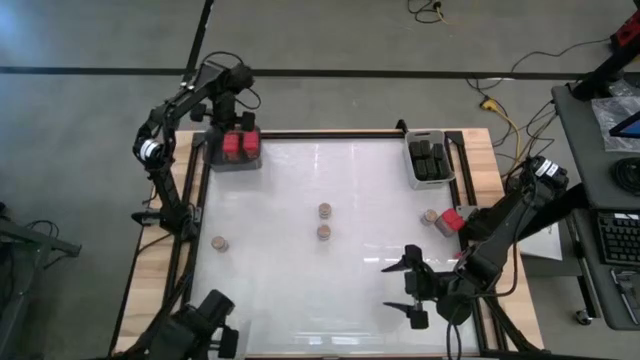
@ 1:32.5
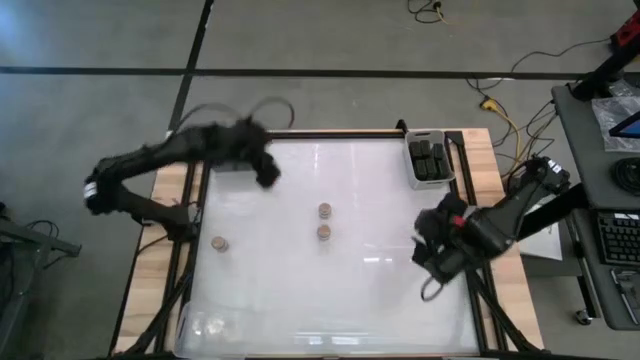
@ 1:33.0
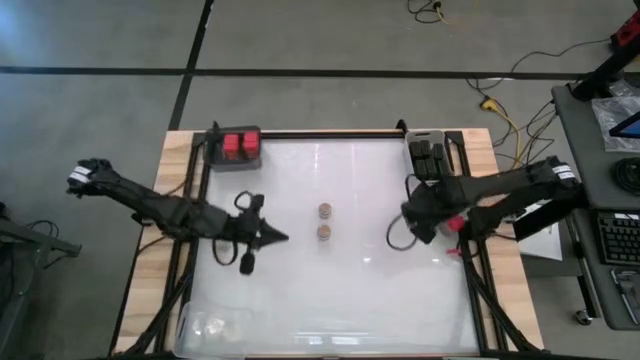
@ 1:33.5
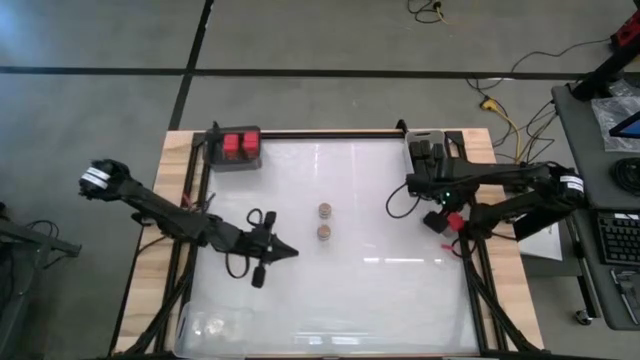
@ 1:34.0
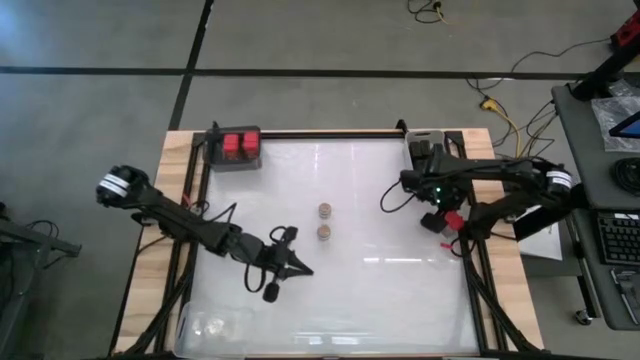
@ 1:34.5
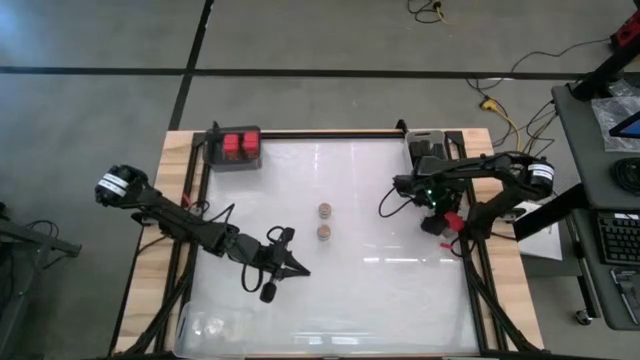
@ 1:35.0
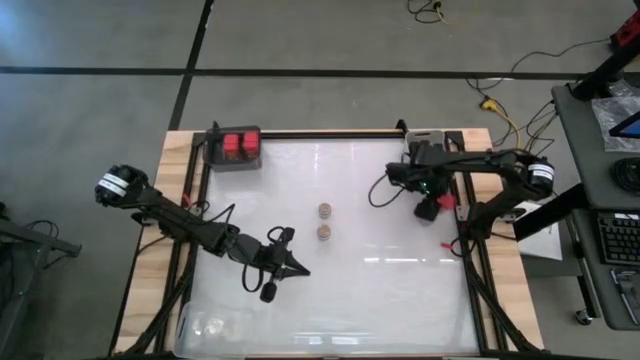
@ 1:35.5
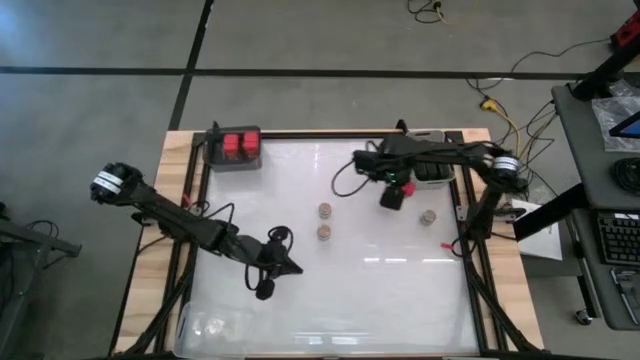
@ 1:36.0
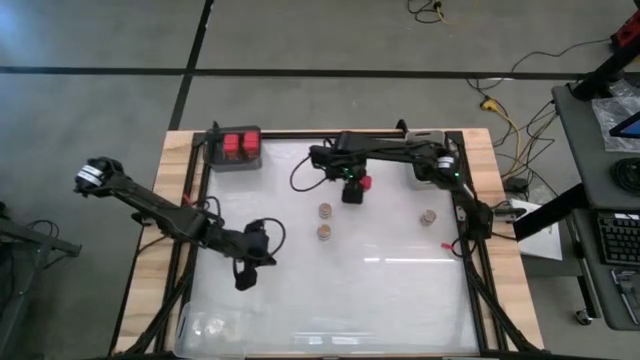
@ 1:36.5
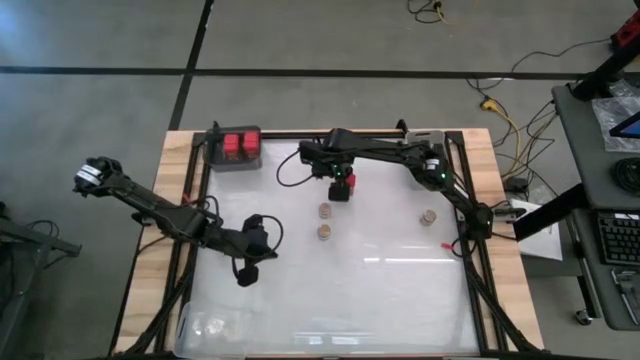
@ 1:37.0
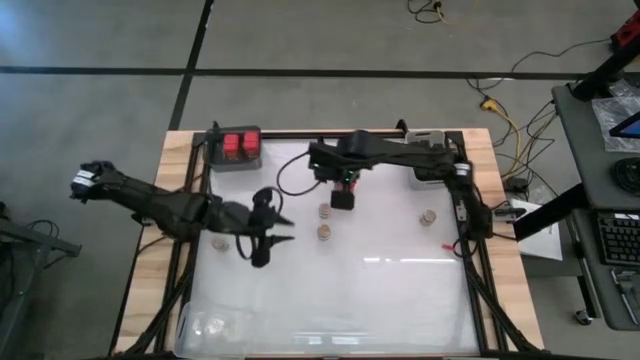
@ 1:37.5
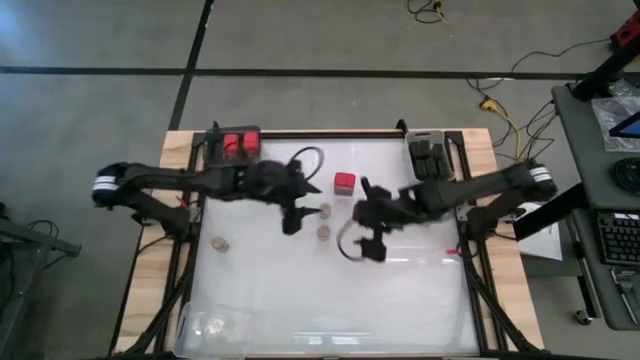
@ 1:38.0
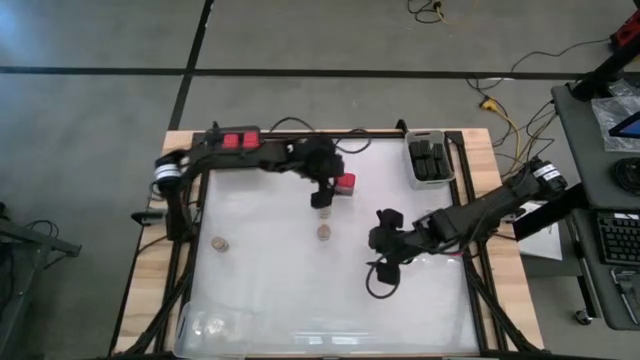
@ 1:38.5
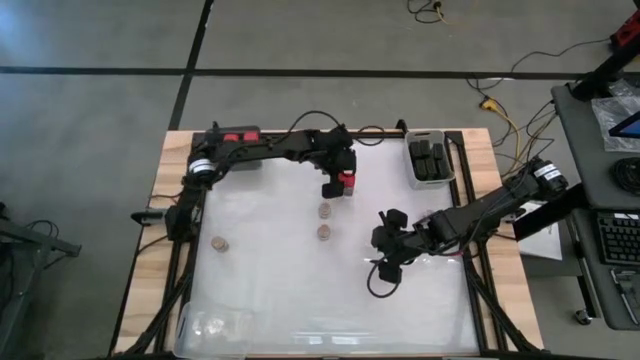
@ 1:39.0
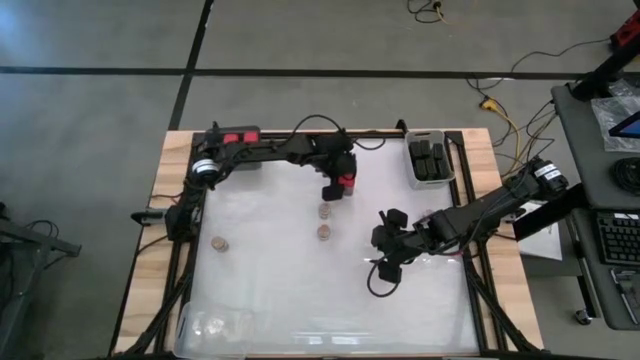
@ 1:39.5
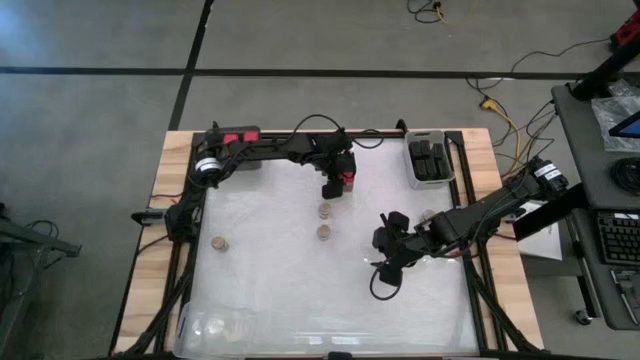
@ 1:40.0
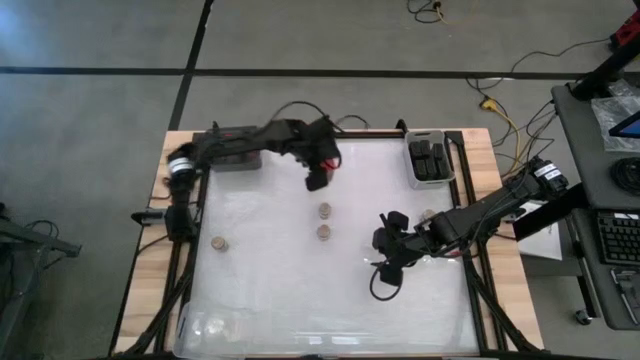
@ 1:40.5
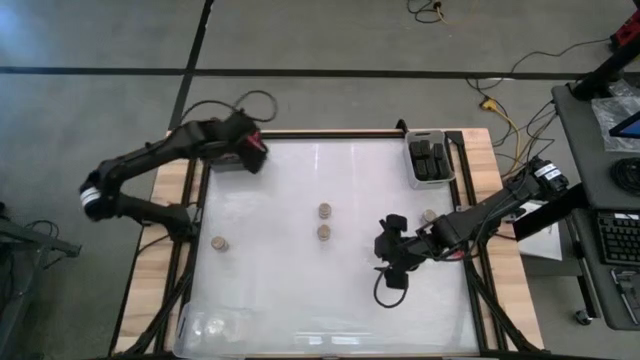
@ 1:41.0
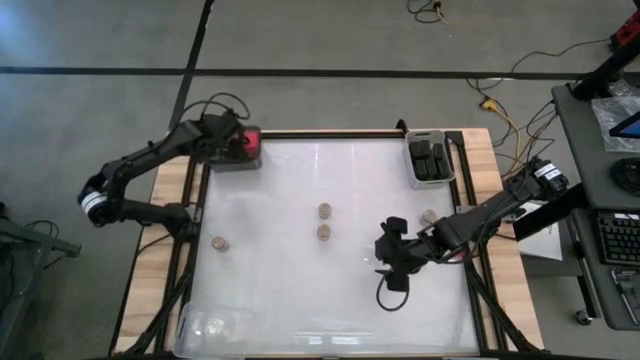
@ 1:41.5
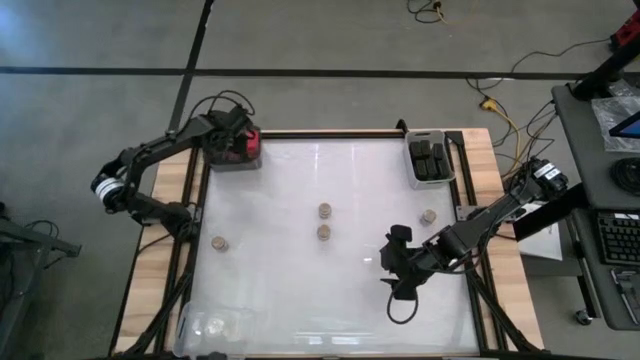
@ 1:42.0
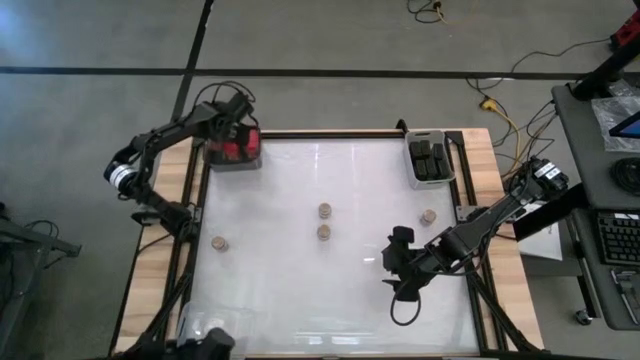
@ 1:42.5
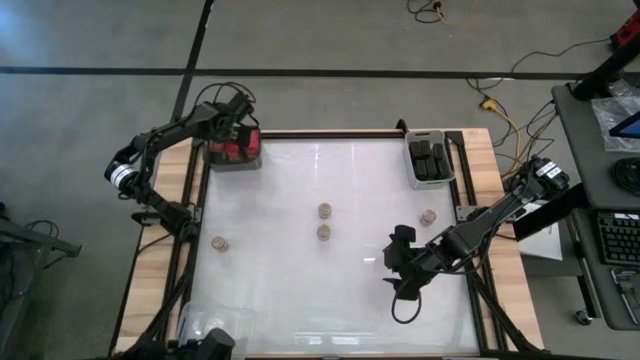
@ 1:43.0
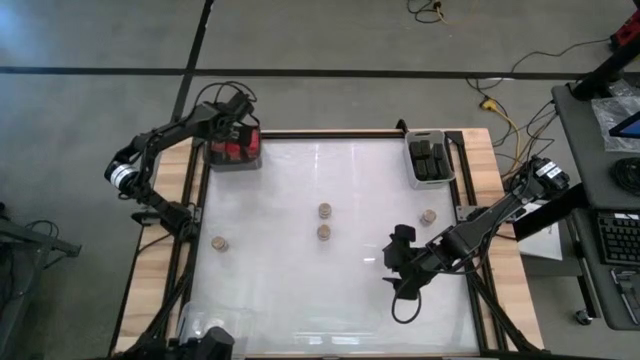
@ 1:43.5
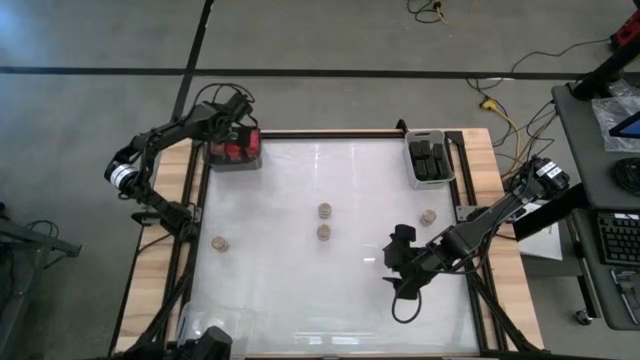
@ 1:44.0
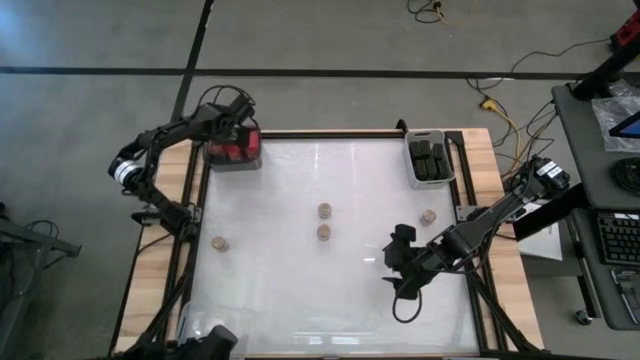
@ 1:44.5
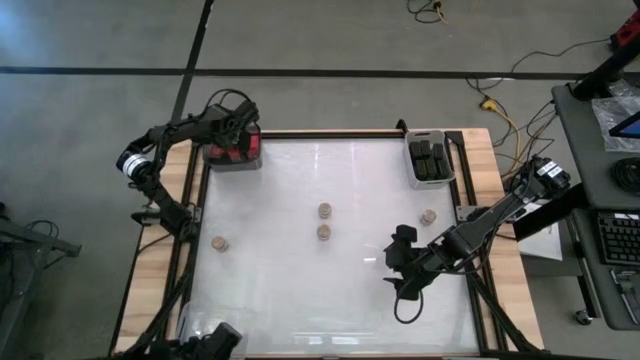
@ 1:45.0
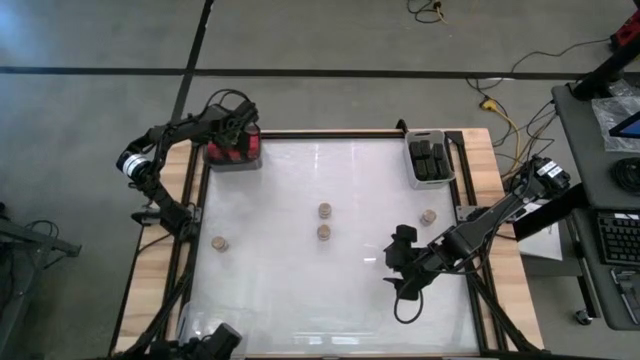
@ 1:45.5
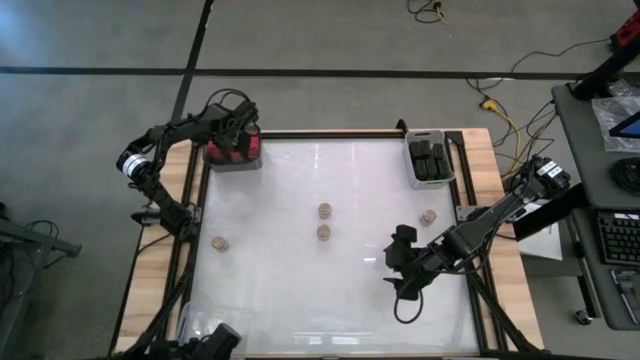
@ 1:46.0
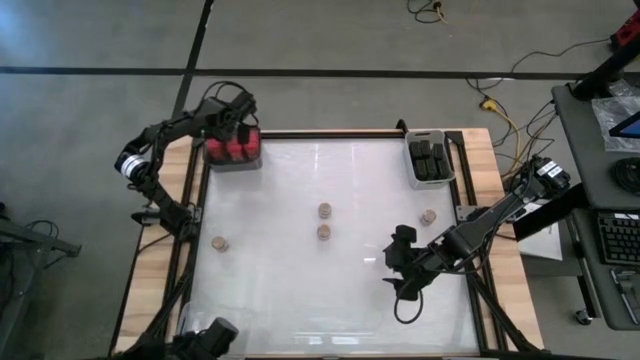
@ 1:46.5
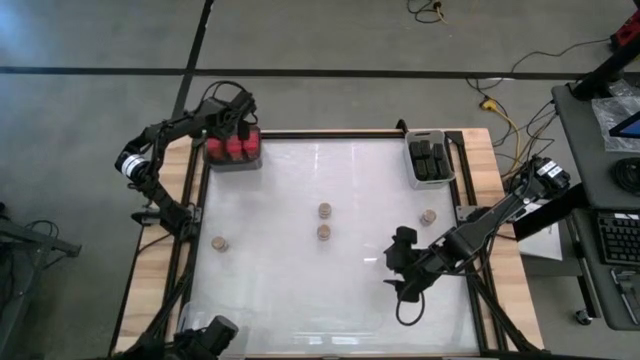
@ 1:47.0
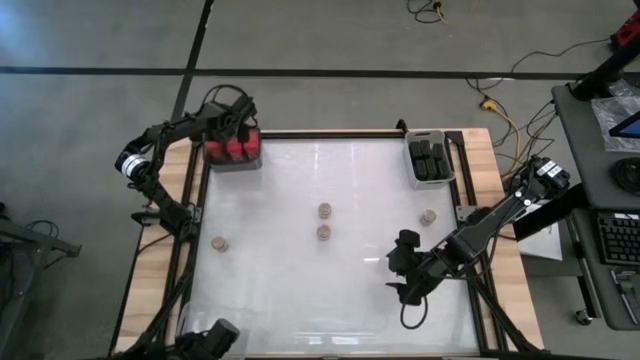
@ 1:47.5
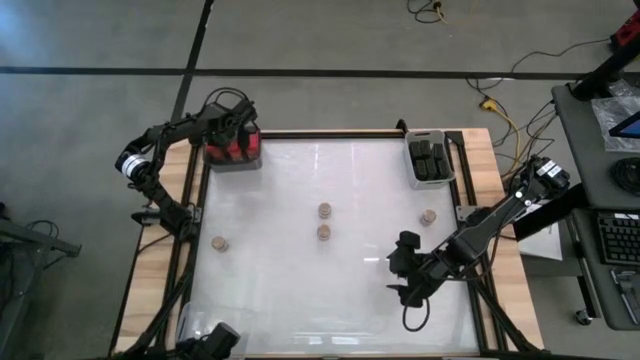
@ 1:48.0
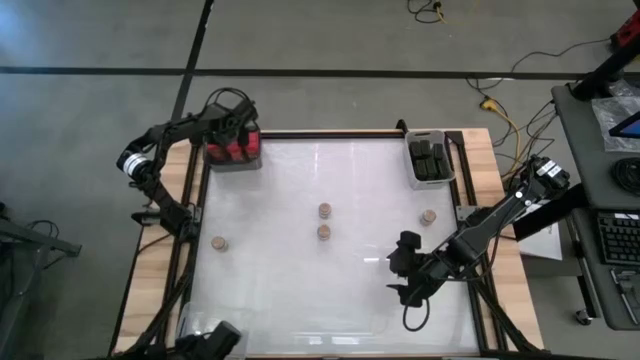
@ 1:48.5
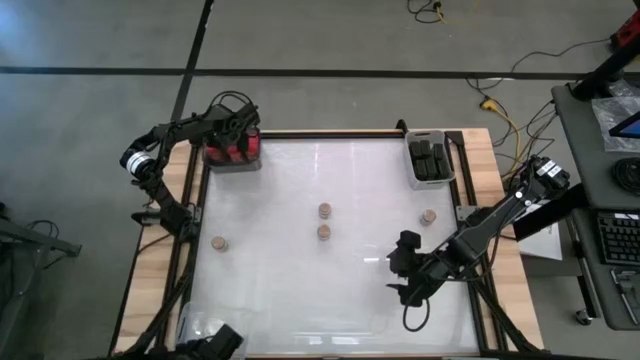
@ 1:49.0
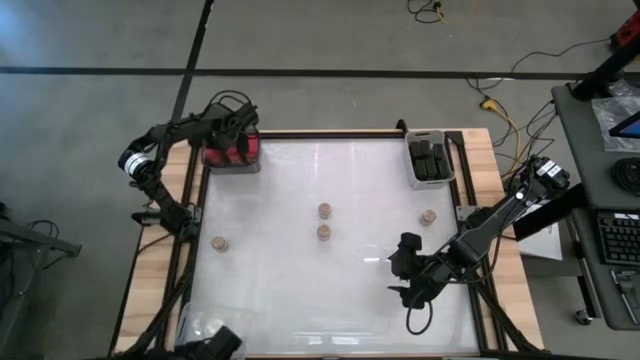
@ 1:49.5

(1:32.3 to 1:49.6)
Task: Sort spices by type
Put the red seasoning can into the black bin

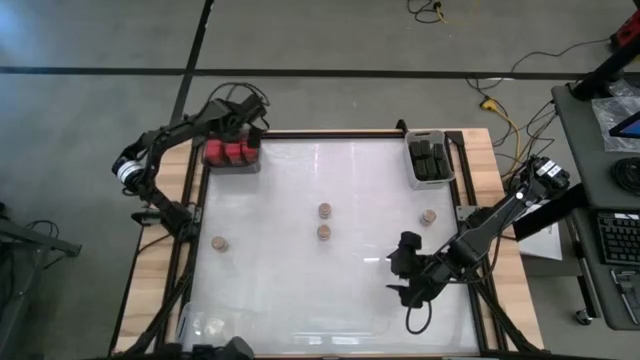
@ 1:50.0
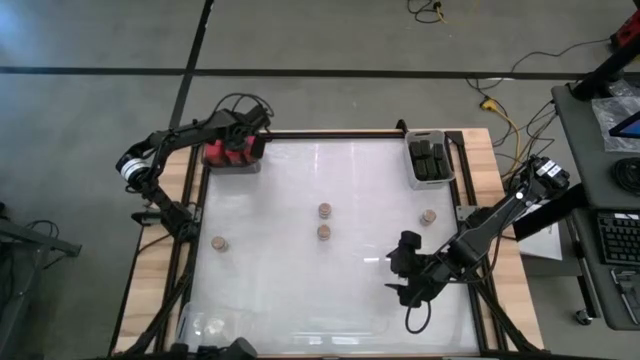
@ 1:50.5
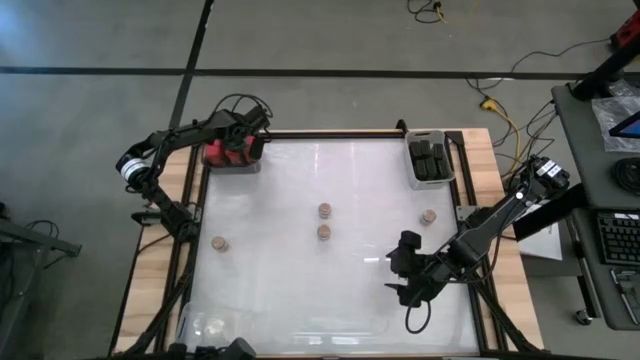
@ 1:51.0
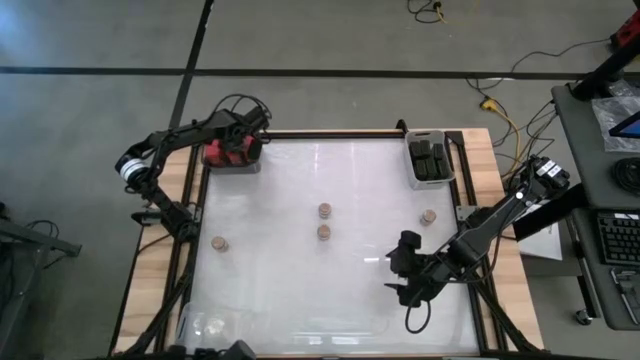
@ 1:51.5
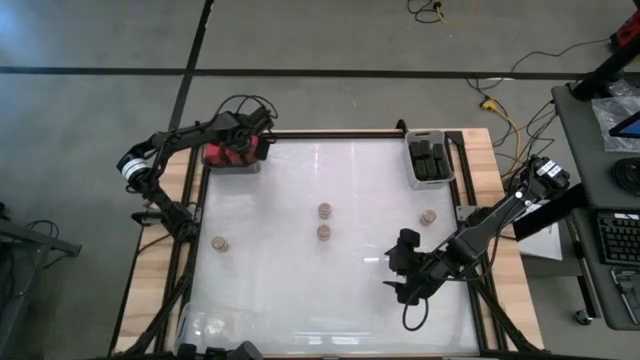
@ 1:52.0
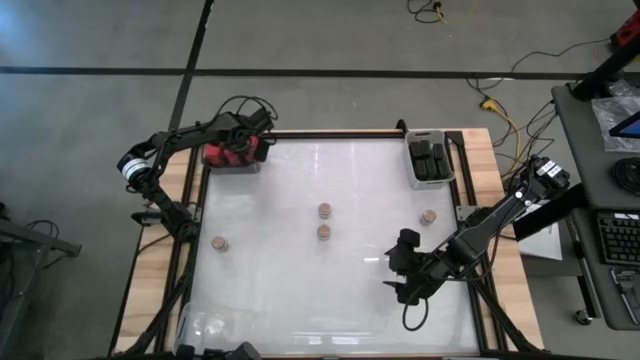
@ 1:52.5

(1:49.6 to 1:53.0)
Adjust the center red seasoning can in the black transparent bin
